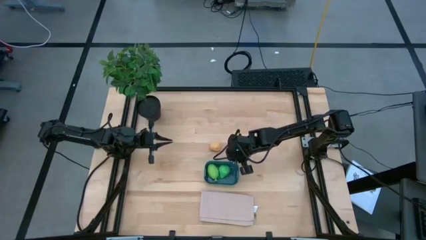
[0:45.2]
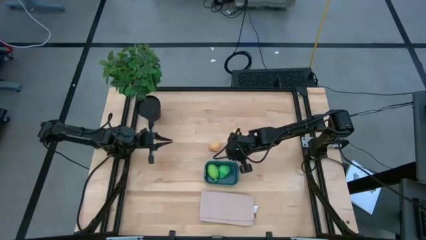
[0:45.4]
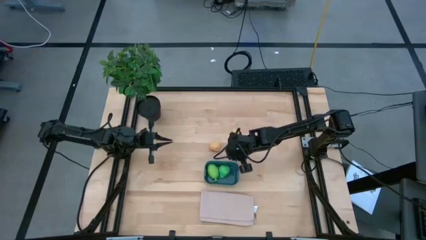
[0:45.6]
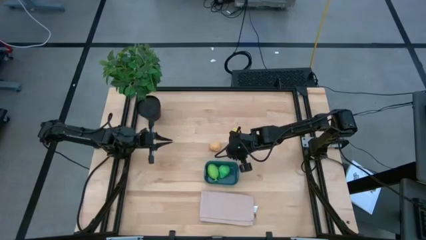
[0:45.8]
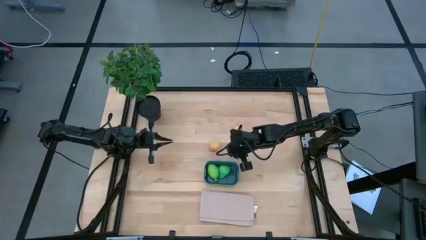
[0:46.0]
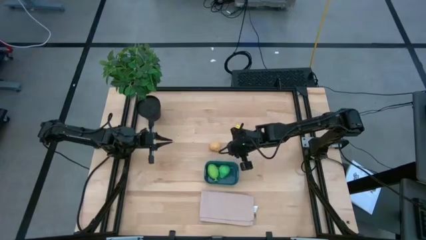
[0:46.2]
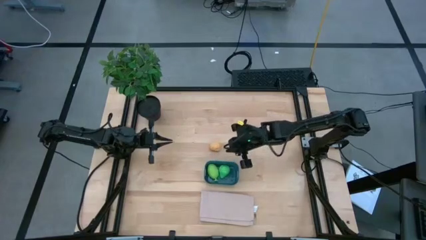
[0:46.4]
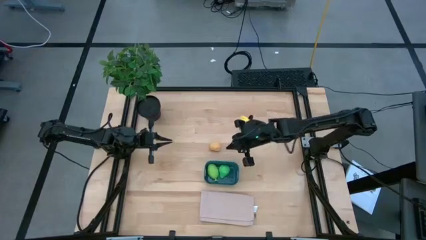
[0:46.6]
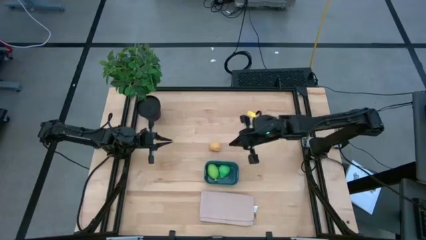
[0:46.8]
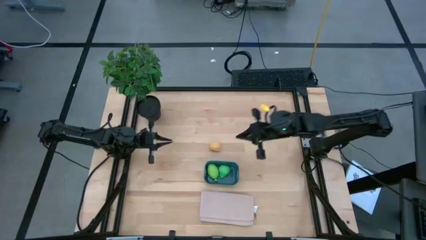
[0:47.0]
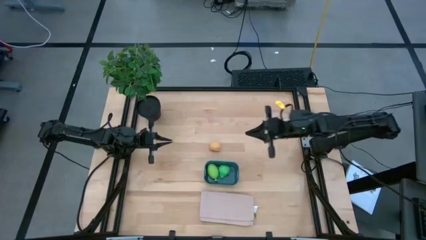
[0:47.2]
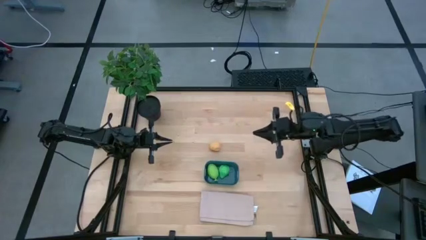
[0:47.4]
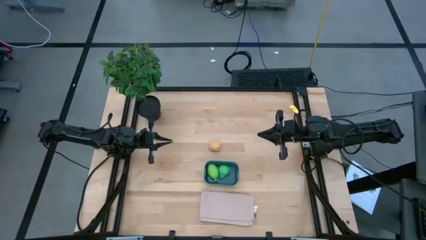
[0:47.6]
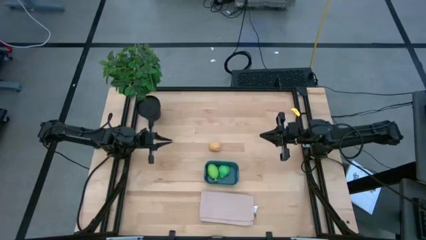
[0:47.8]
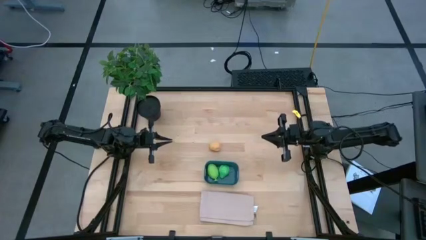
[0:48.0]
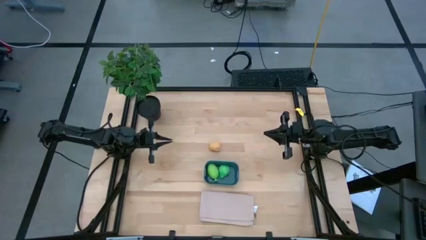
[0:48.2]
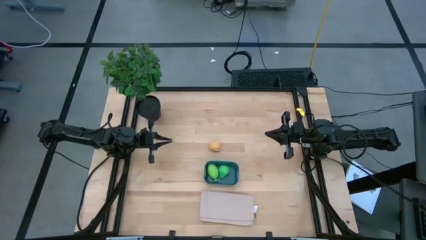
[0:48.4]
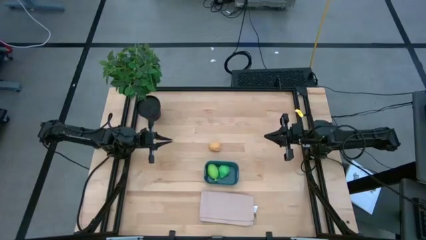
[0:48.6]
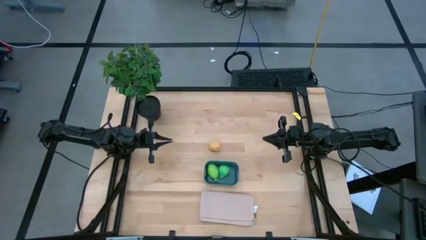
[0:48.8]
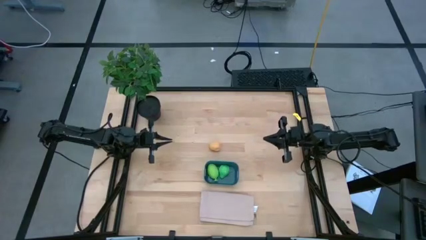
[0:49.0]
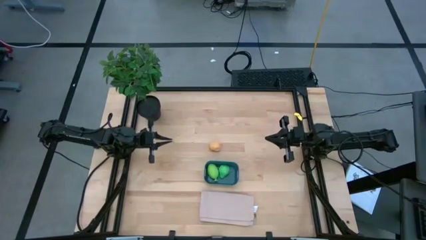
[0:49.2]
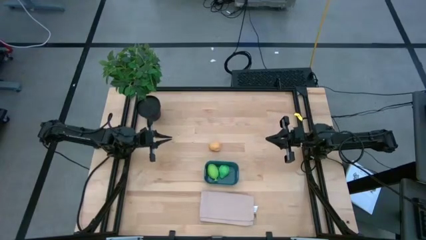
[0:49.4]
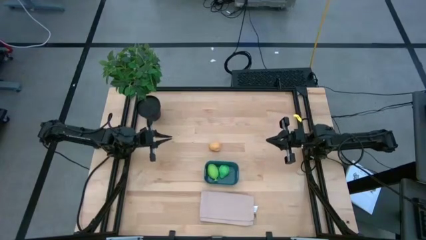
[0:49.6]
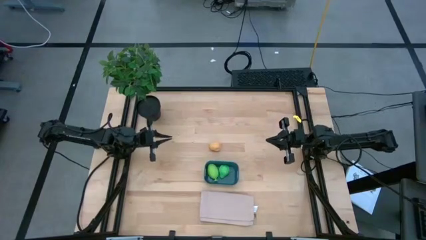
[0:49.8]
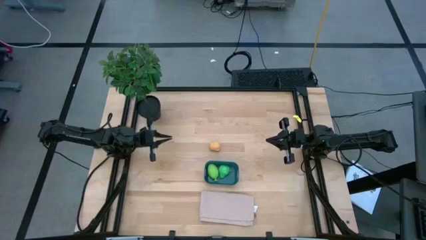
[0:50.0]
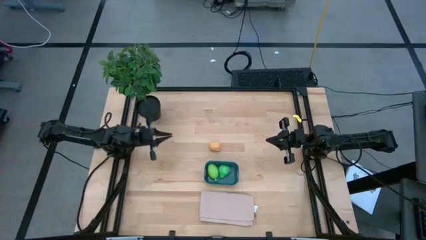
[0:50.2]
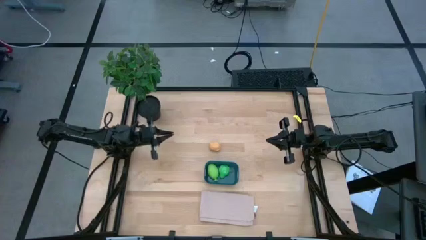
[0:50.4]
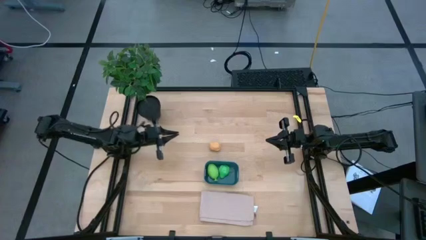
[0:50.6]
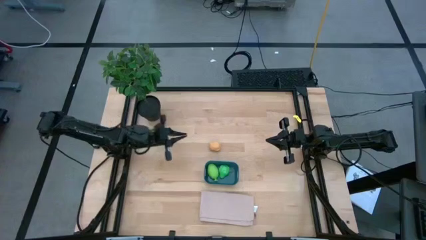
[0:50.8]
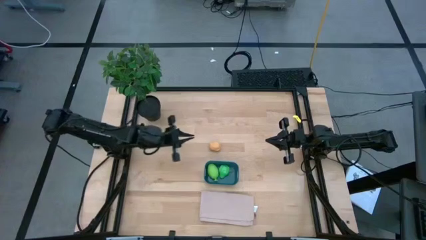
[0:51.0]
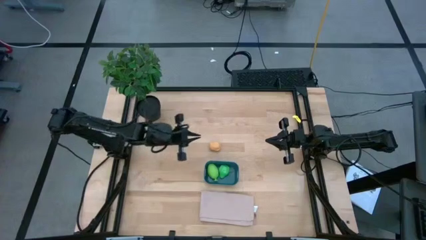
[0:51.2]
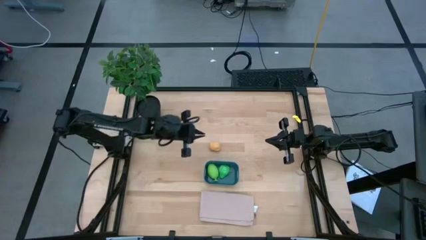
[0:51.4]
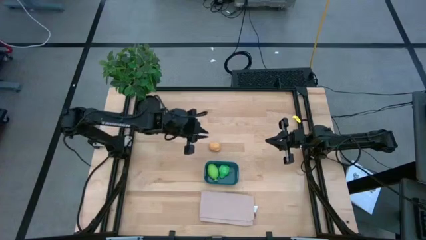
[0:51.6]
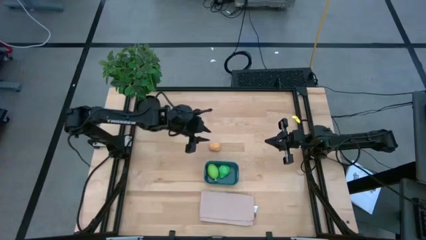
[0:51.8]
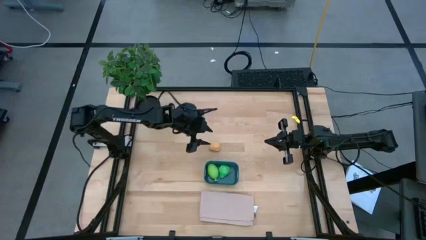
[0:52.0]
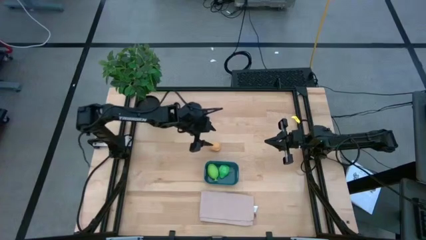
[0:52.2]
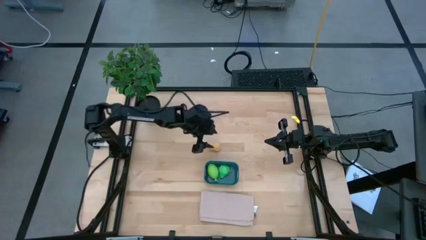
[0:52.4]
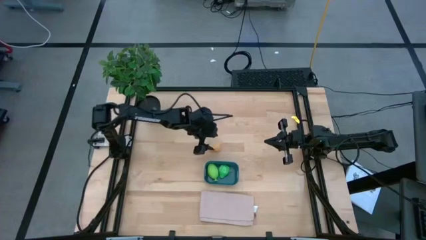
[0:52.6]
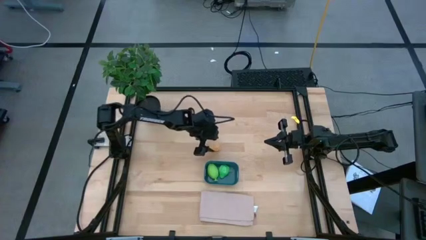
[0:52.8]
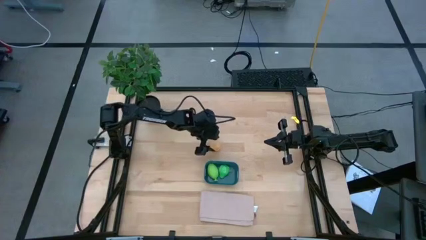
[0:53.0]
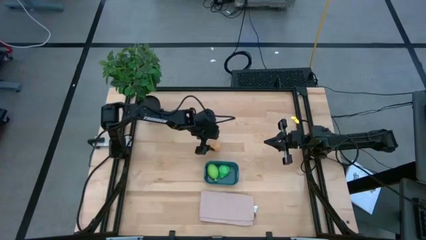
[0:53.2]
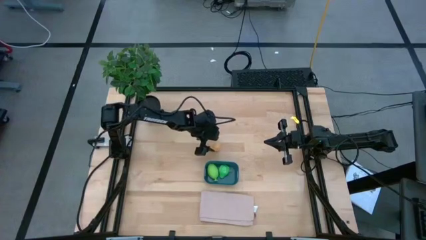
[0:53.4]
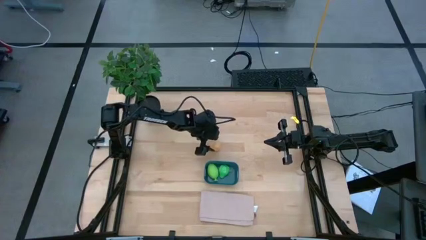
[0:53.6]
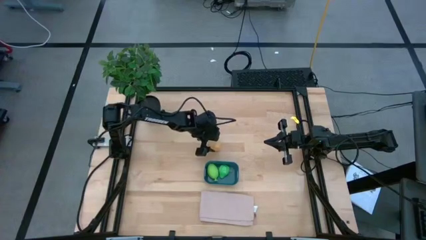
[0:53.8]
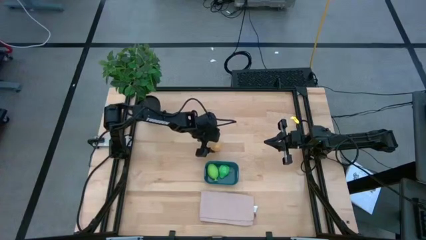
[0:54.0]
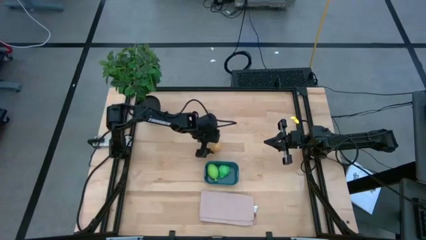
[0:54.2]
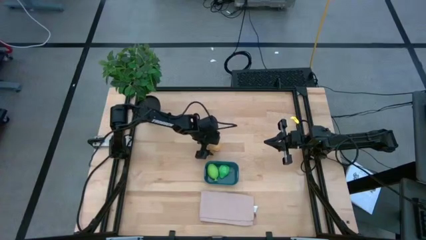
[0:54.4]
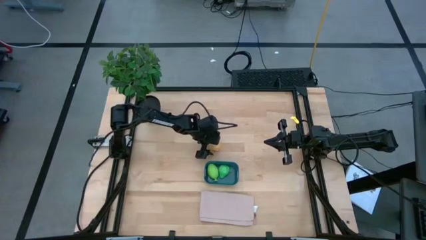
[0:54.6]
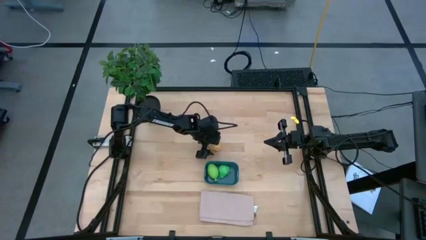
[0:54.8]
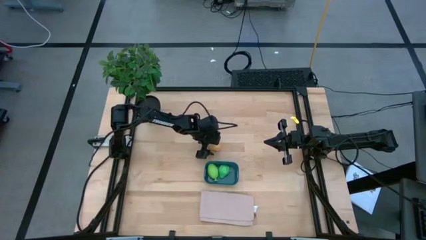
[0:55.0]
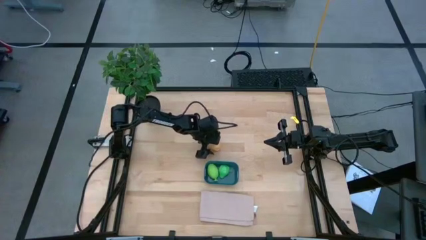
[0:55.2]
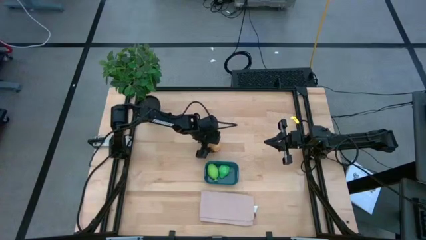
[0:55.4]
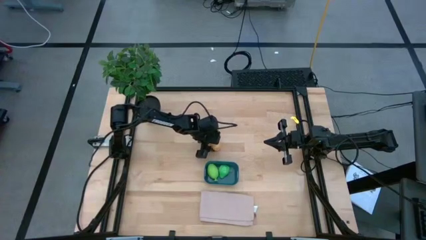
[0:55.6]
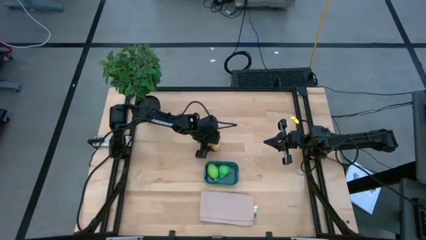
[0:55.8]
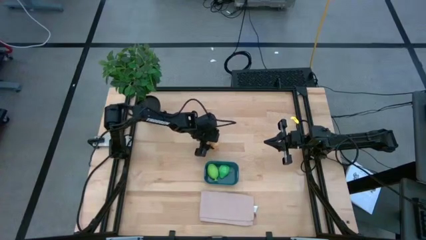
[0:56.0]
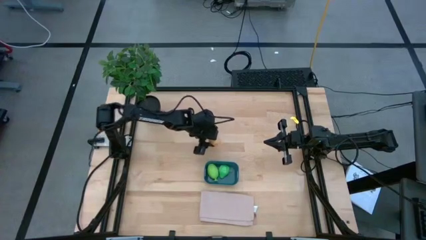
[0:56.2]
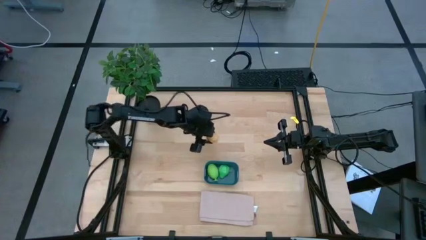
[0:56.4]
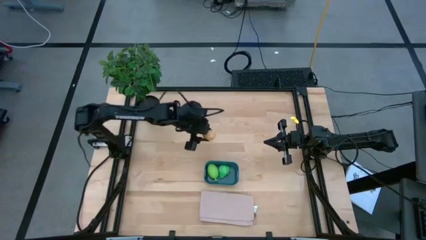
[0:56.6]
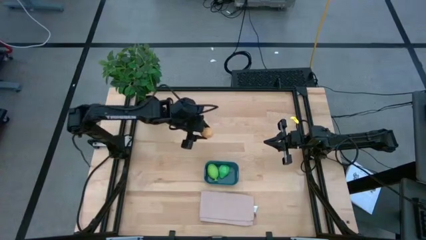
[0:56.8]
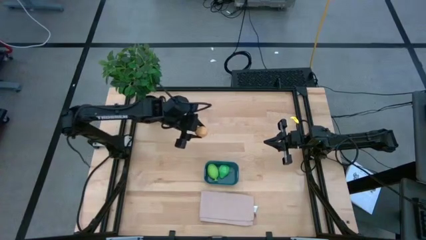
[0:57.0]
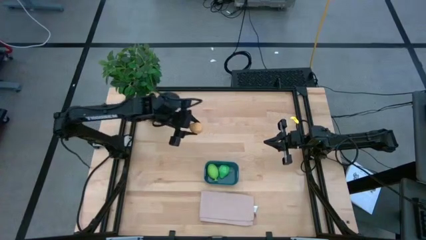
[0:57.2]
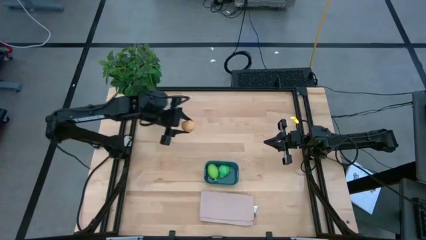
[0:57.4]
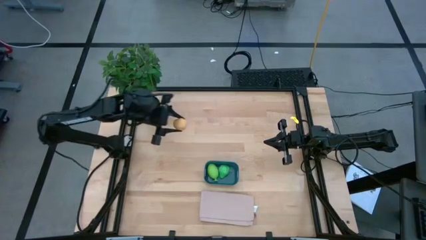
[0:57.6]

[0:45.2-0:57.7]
Task: Pick and placing Produce into tupperware
Put the brown potato into the blue bin
